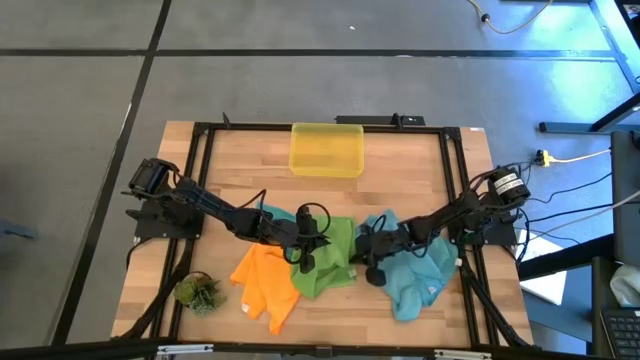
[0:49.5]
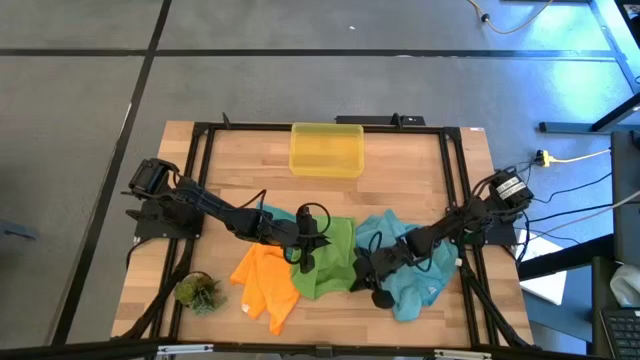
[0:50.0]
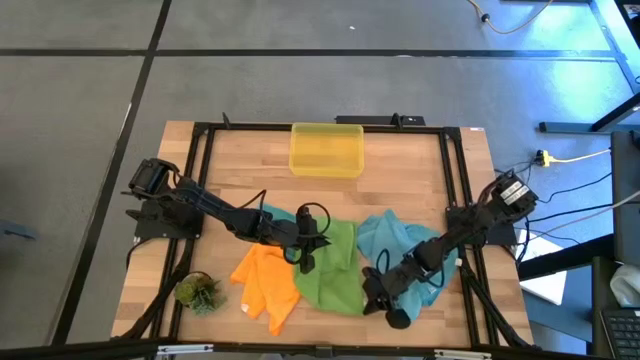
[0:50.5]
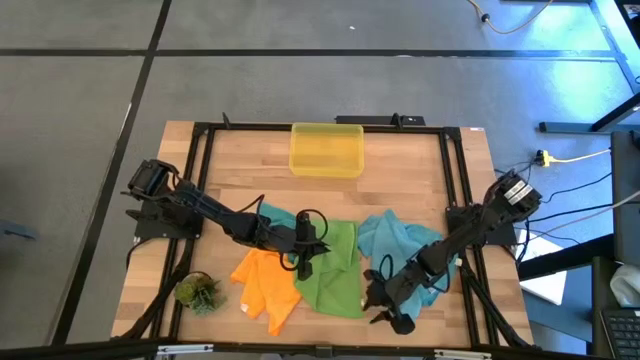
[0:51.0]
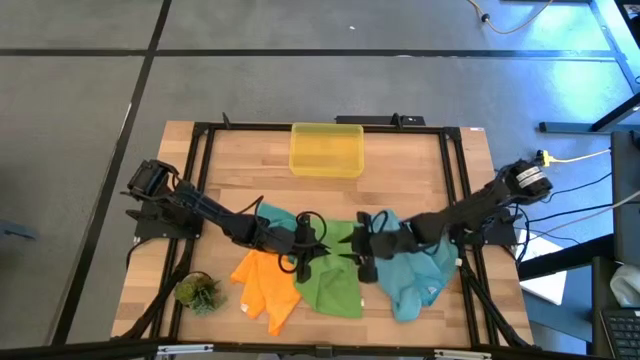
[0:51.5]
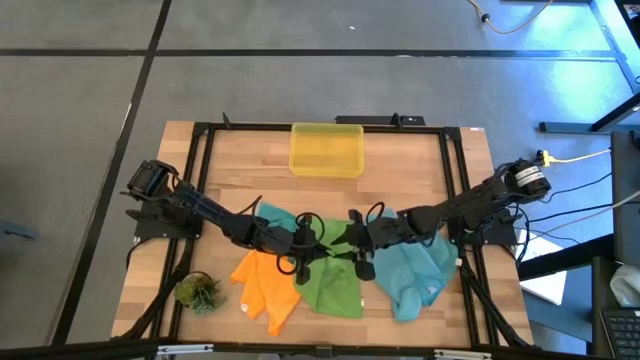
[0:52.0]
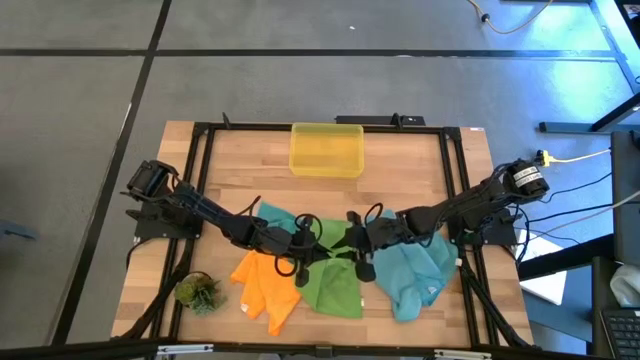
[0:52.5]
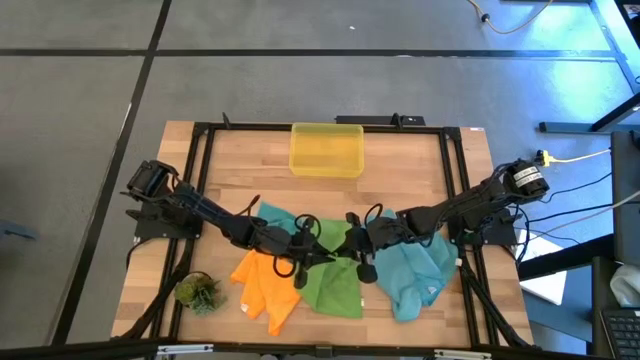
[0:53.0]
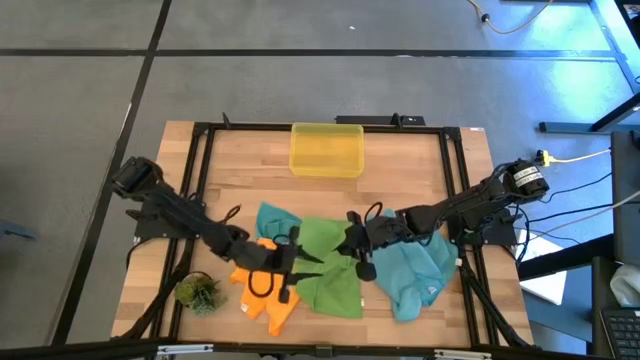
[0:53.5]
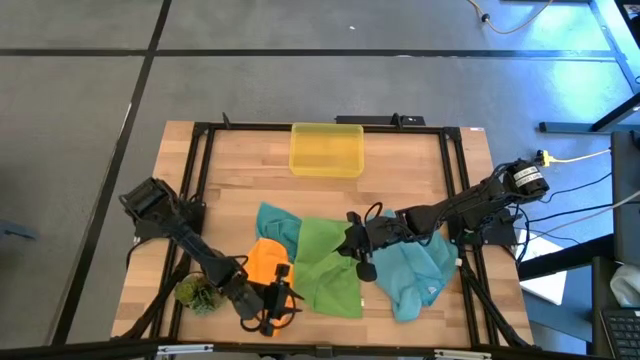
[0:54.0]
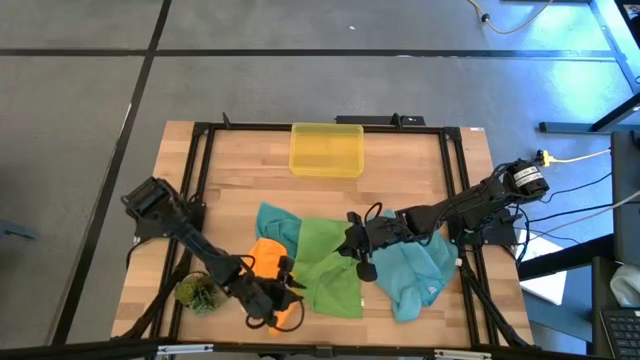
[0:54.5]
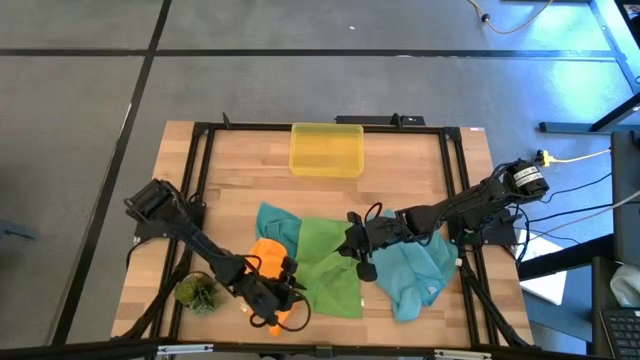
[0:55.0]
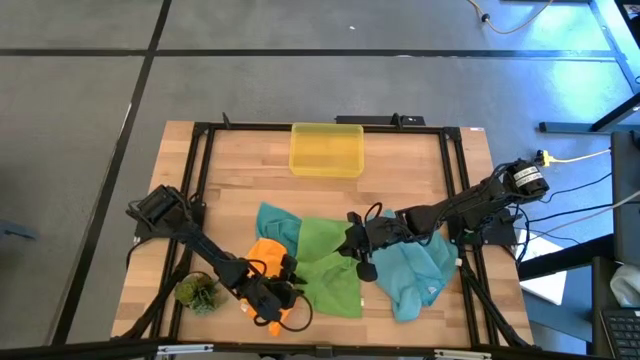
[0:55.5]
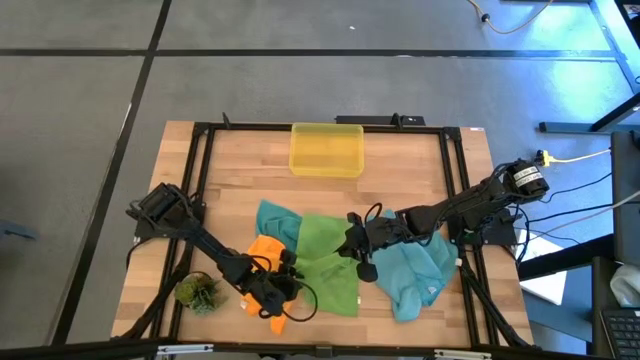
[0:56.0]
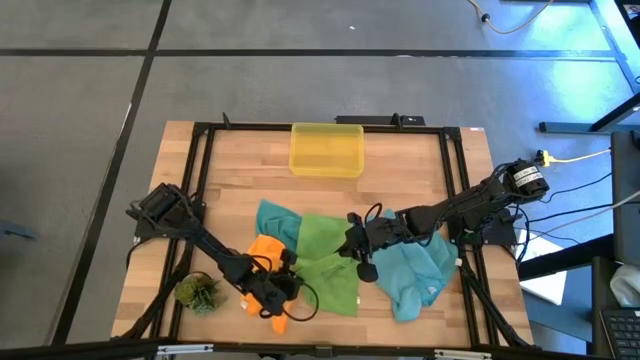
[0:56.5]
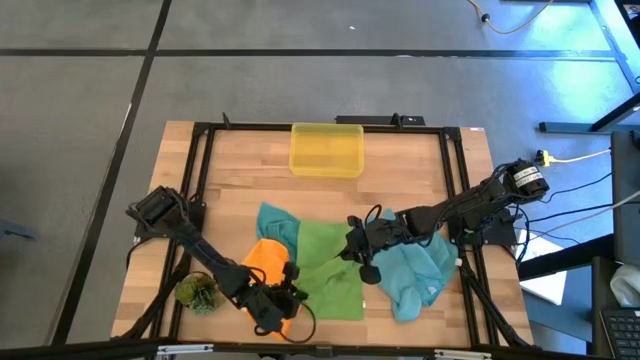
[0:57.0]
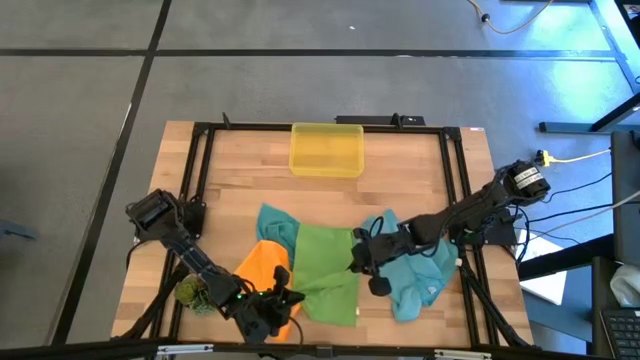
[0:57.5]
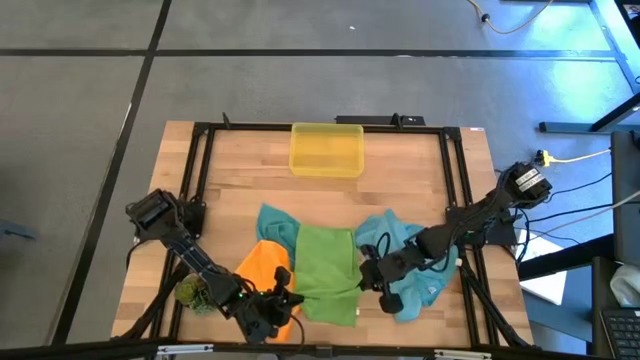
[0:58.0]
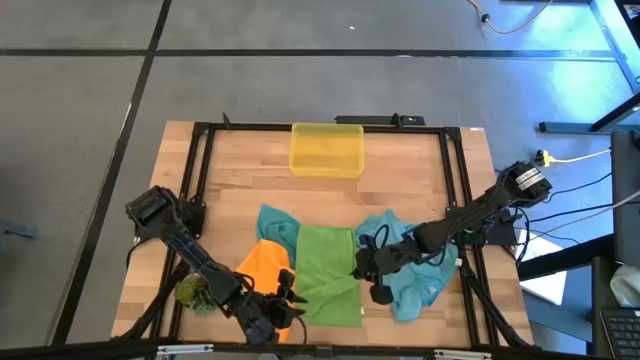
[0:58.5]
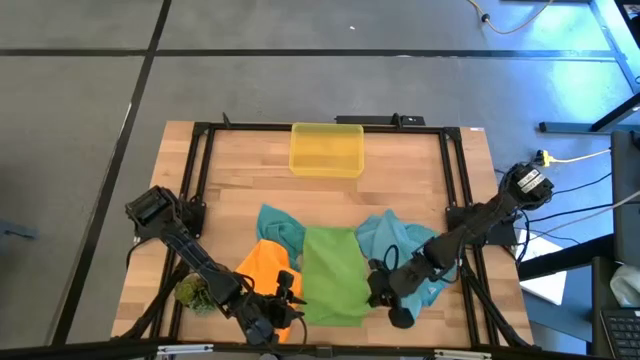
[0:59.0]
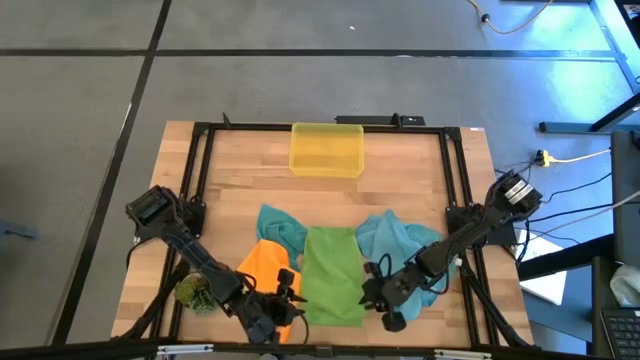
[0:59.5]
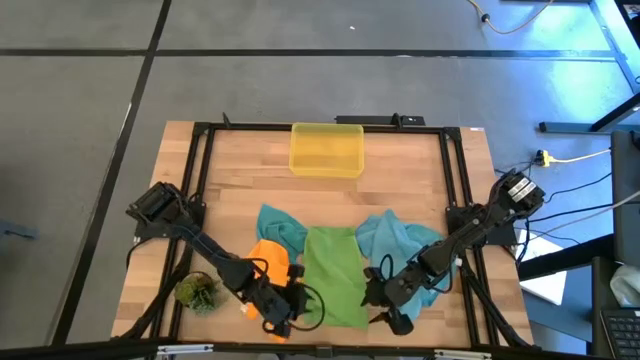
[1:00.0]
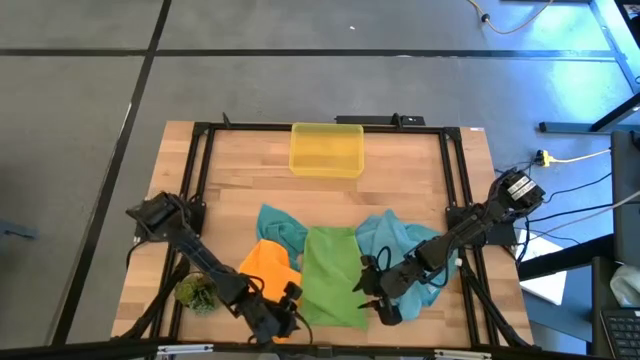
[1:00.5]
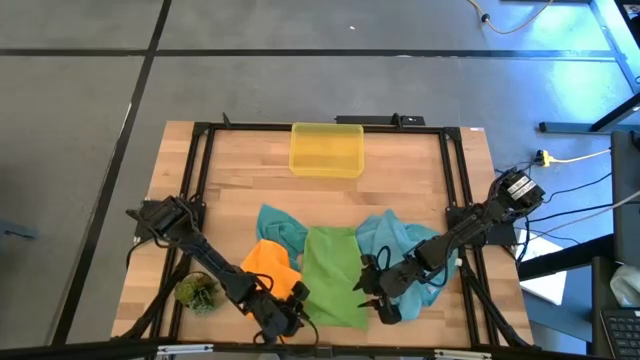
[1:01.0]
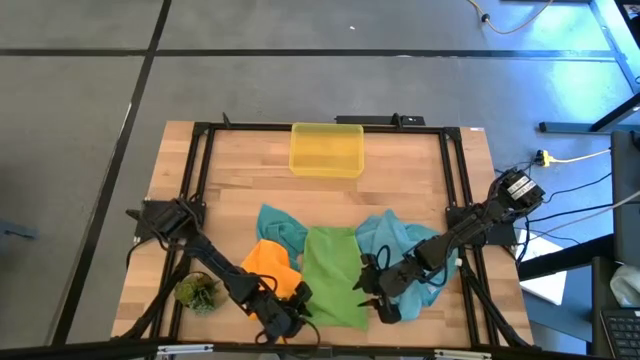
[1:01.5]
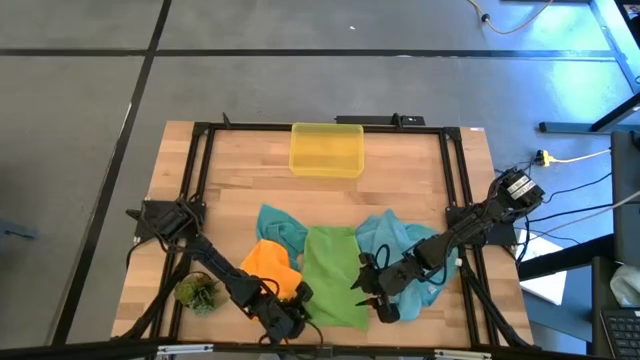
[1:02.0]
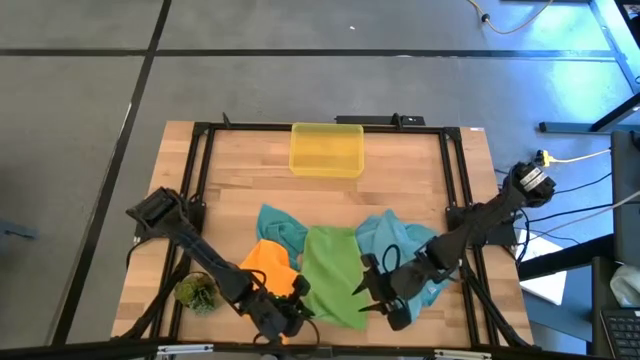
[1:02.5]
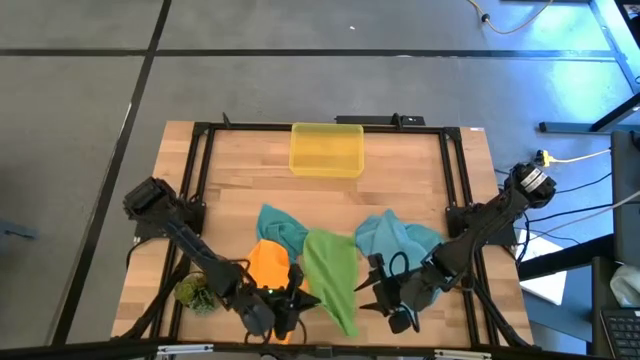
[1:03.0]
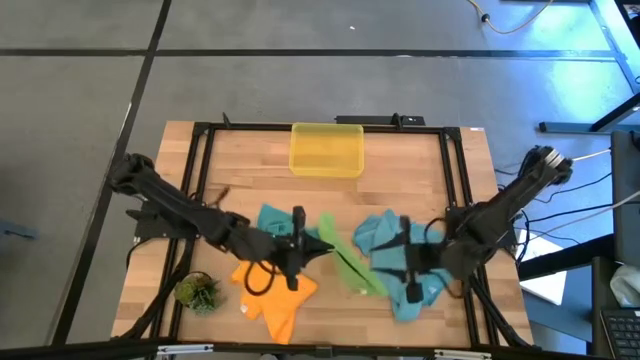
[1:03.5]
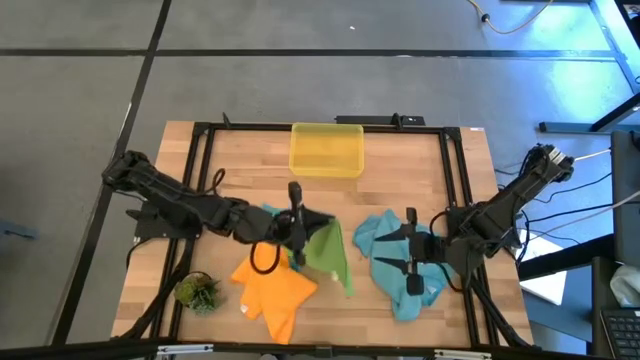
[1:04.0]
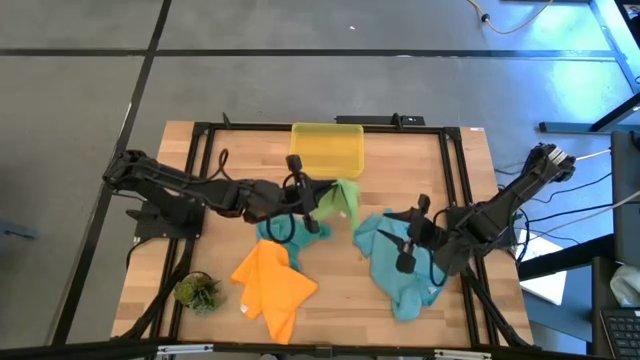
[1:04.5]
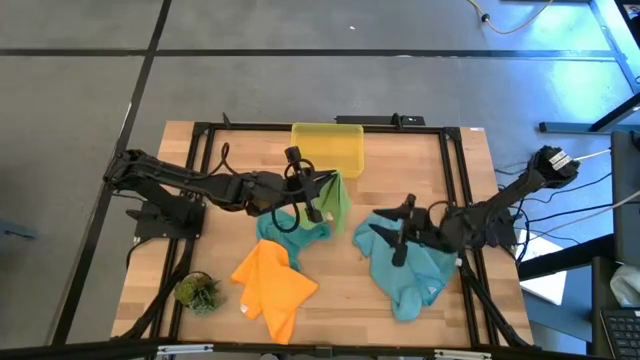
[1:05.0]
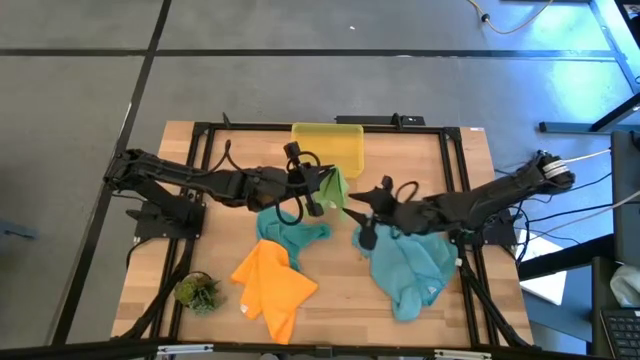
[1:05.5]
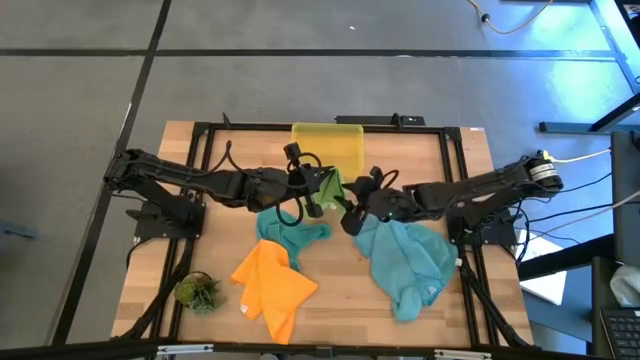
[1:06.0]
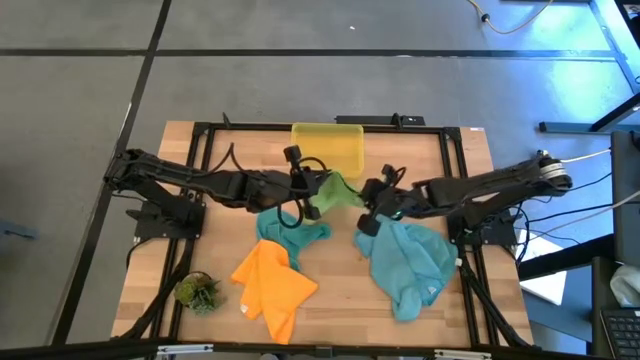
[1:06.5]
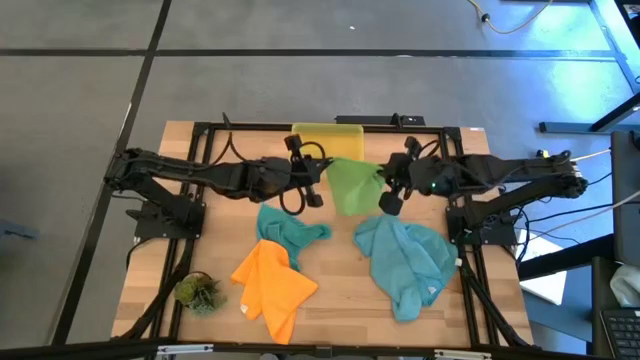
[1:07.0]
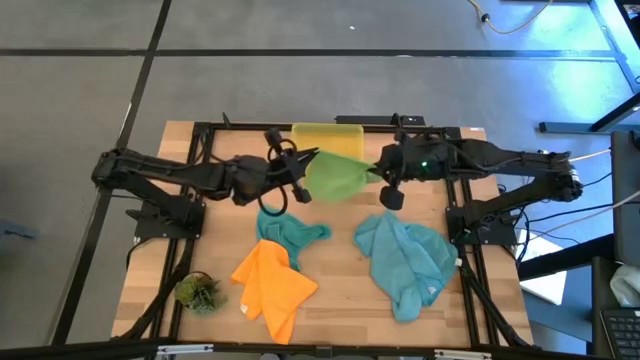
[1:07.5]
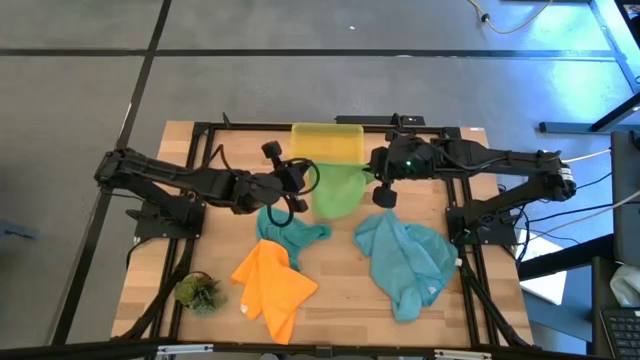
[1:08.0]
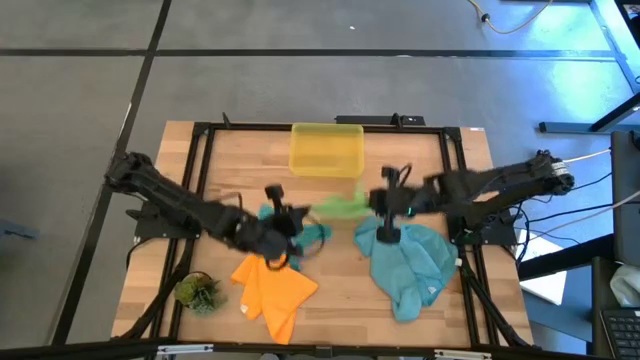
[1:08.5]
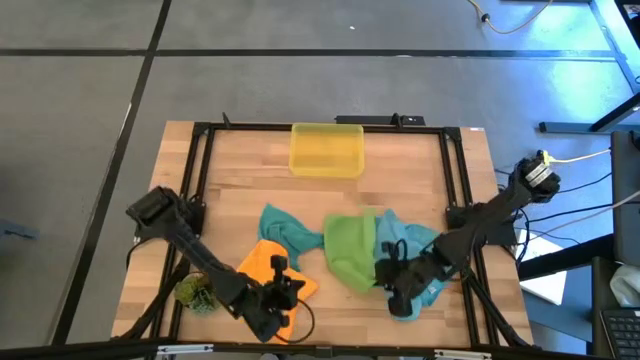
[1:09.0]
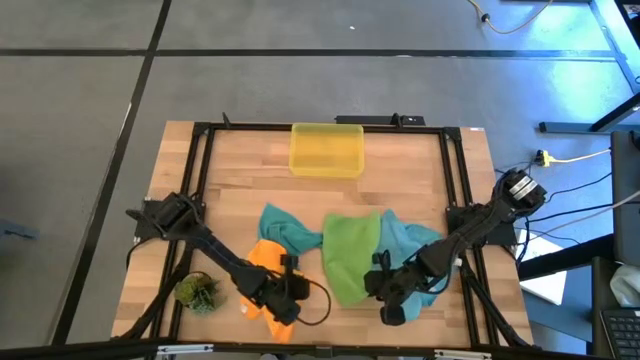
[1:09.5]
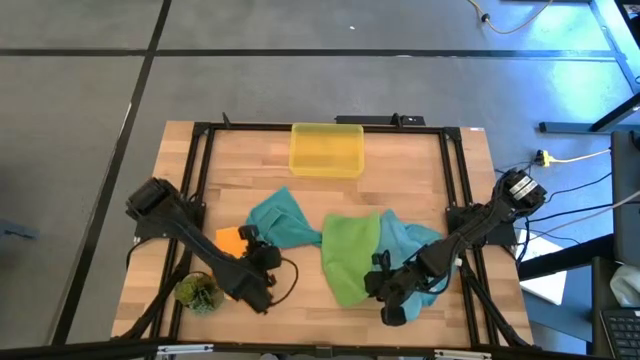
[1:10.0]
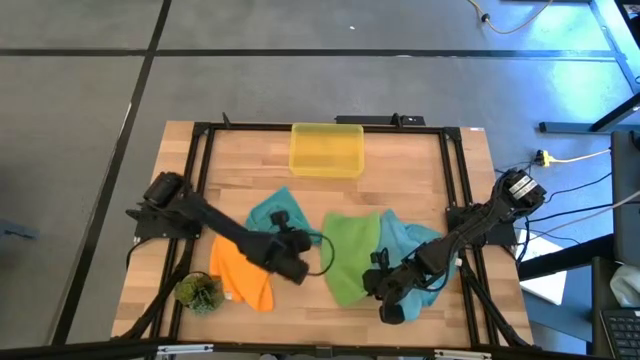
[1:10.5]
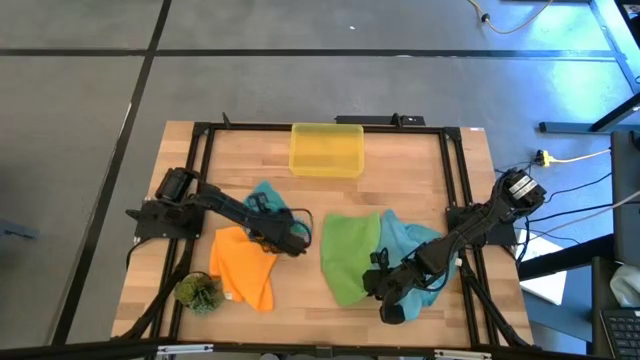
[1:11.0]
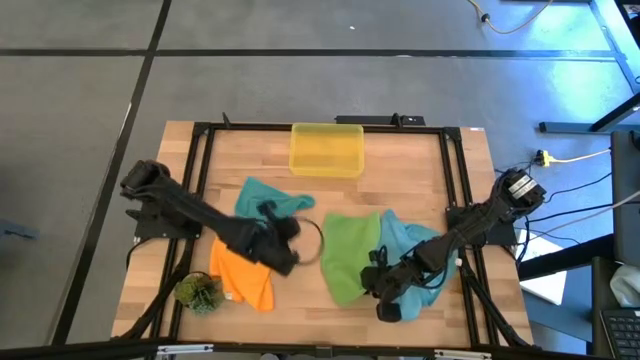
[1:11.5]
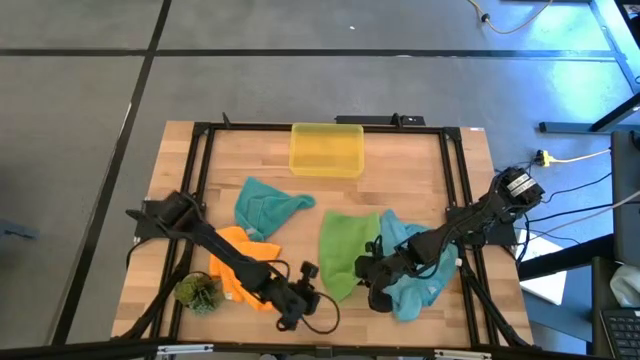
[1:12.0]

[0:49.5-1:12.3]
Task: Fold microfiber towels
Fold the green microfiber cloth
